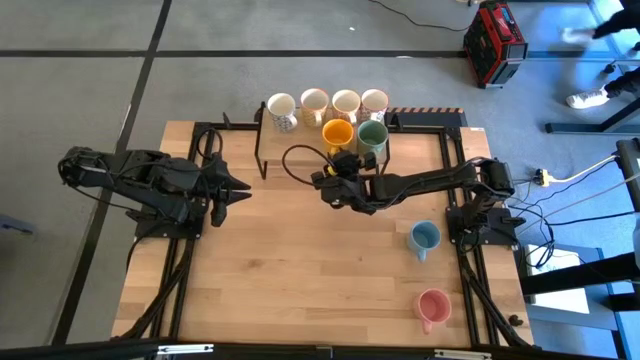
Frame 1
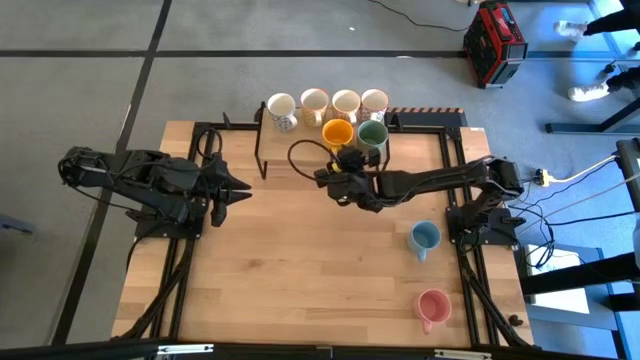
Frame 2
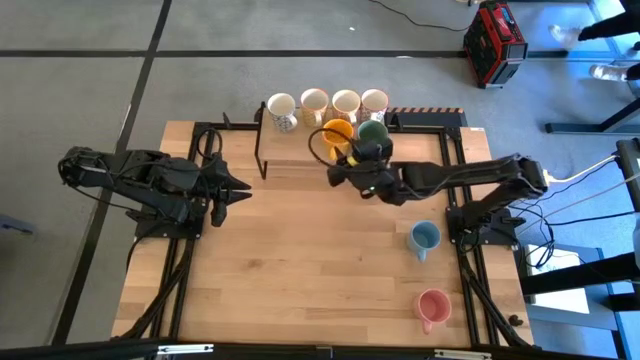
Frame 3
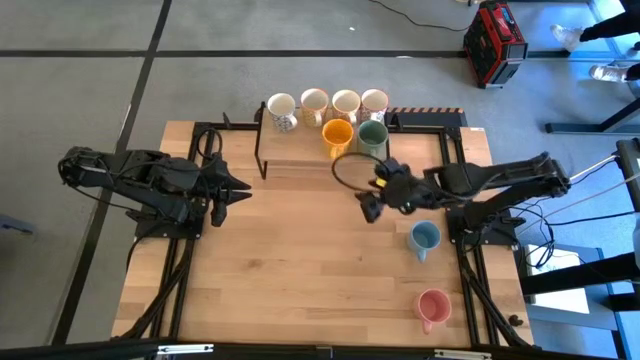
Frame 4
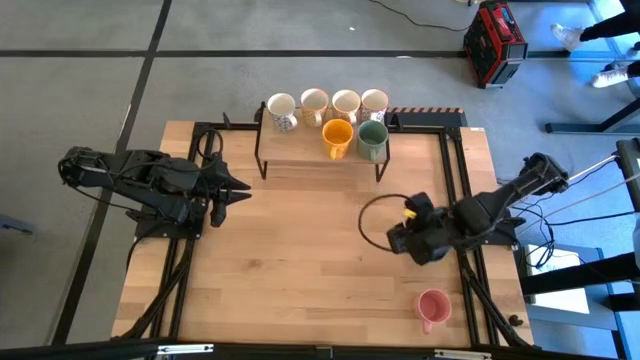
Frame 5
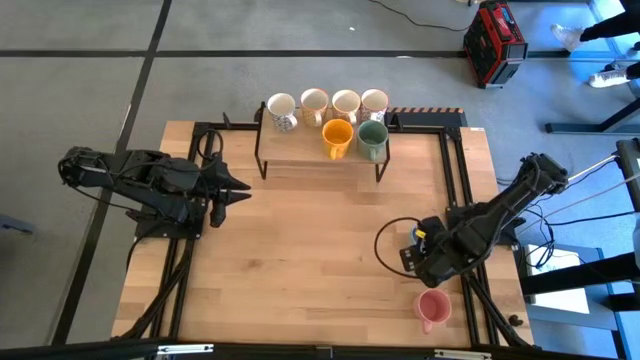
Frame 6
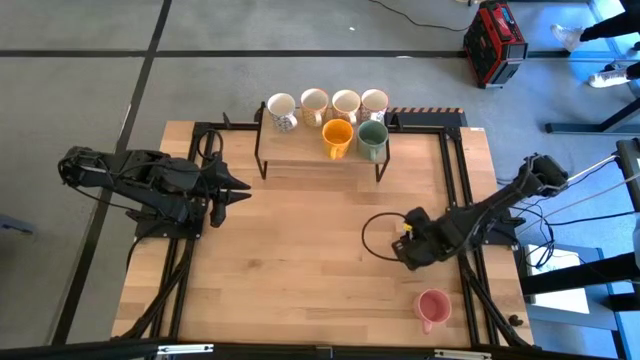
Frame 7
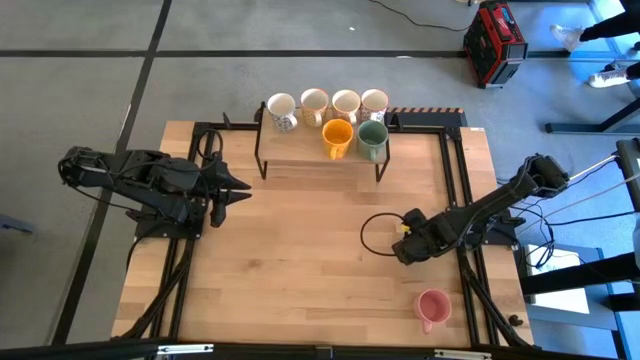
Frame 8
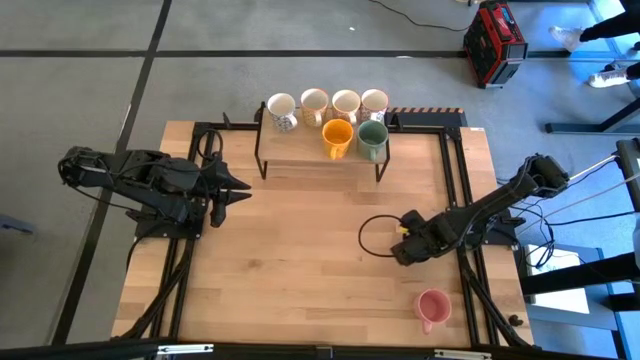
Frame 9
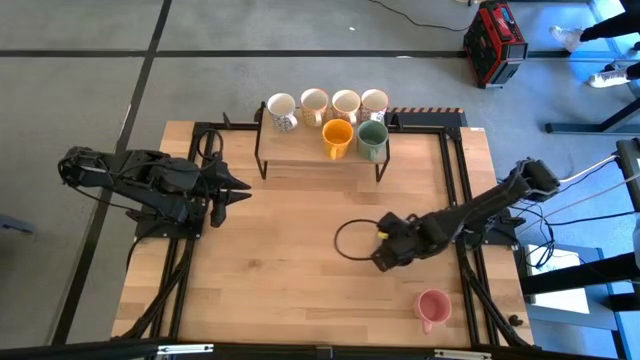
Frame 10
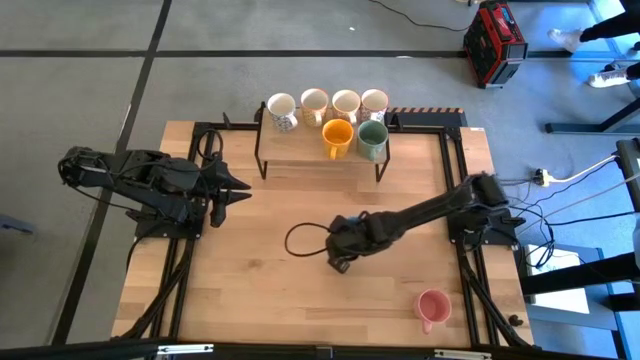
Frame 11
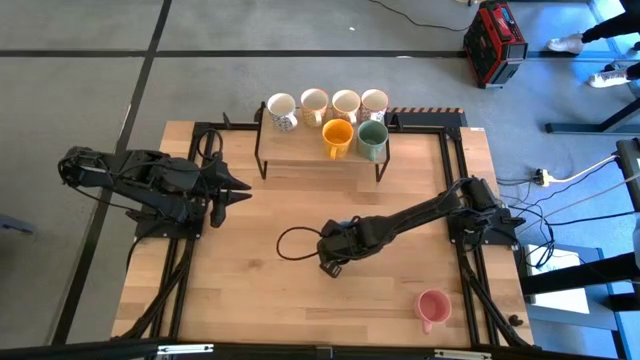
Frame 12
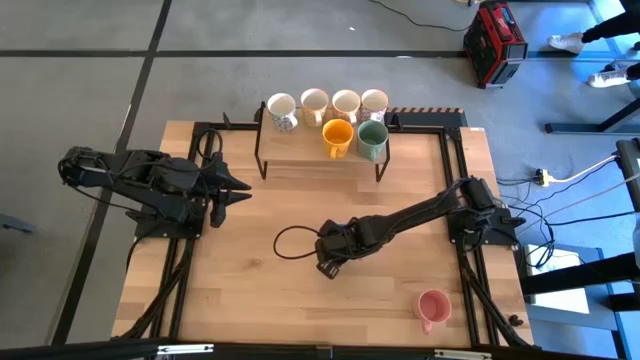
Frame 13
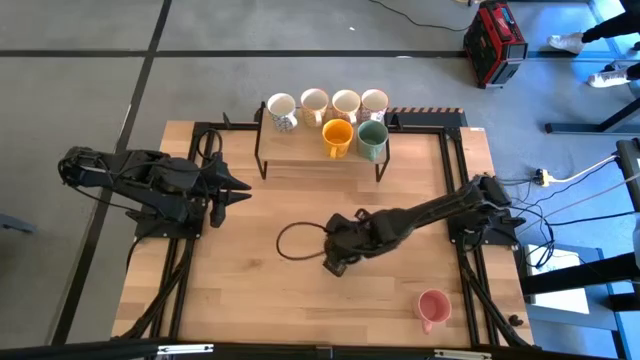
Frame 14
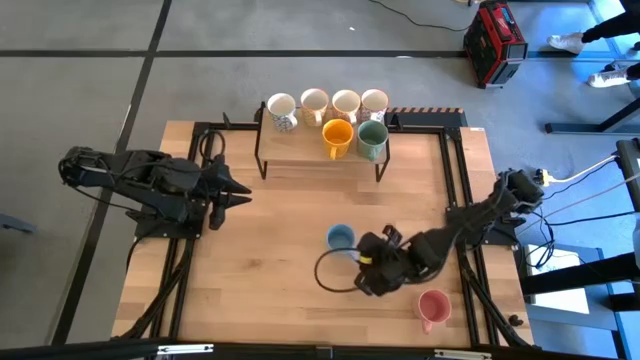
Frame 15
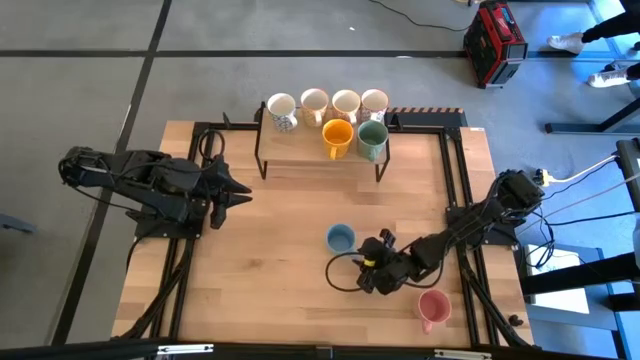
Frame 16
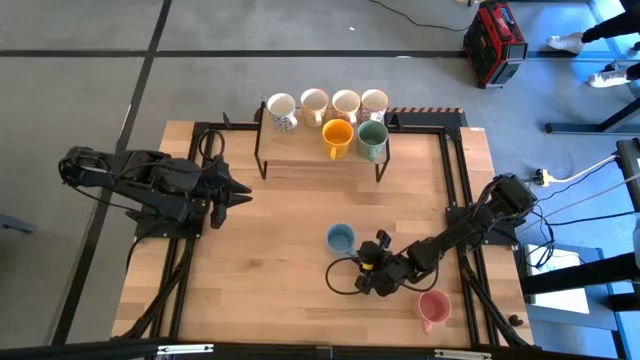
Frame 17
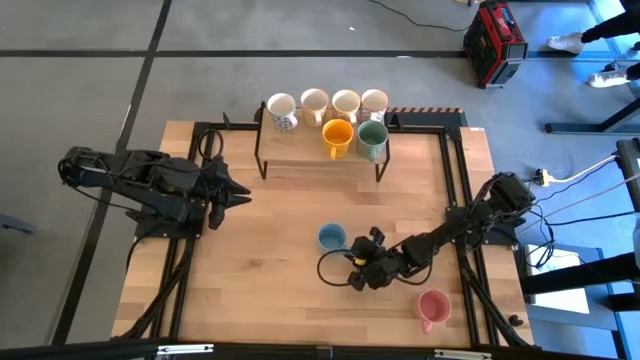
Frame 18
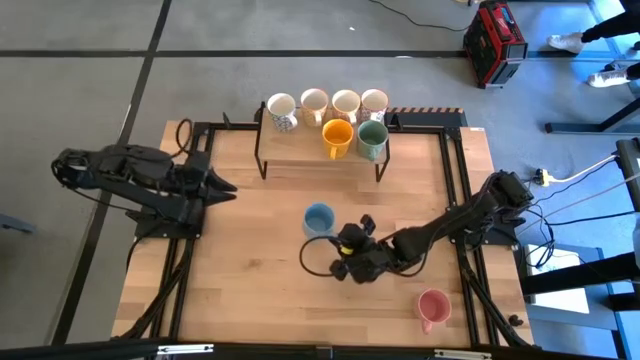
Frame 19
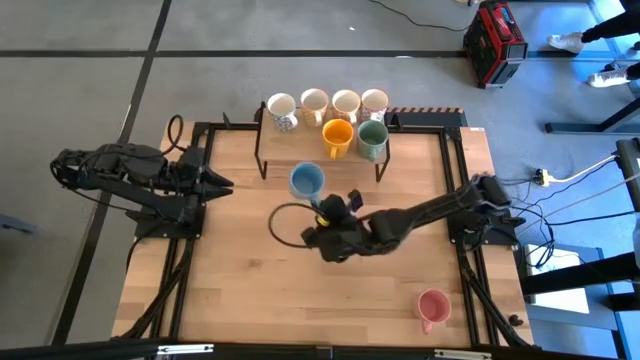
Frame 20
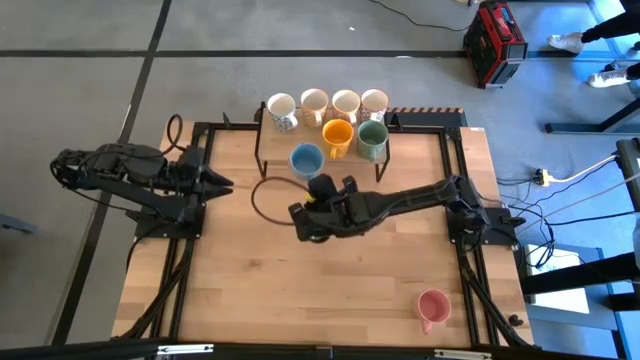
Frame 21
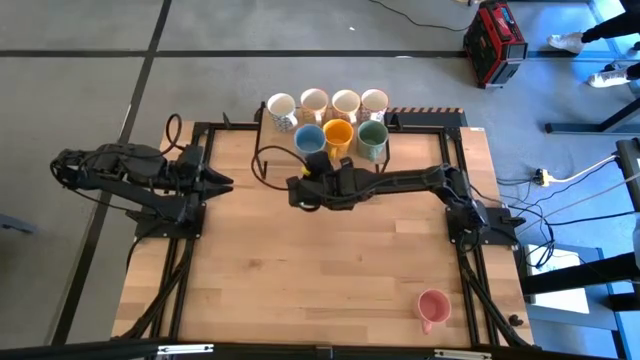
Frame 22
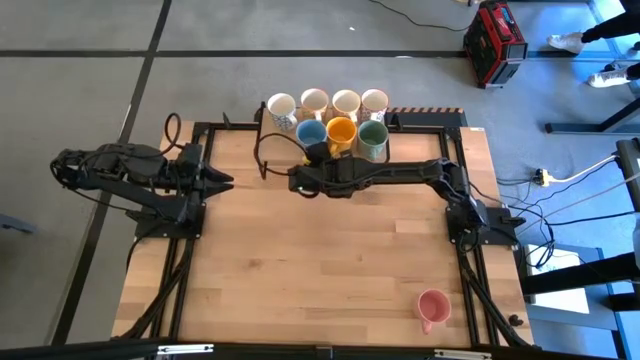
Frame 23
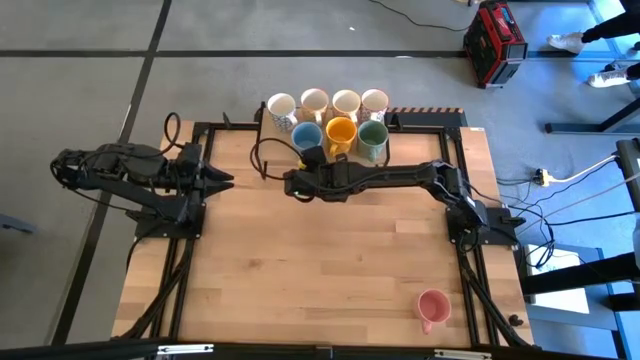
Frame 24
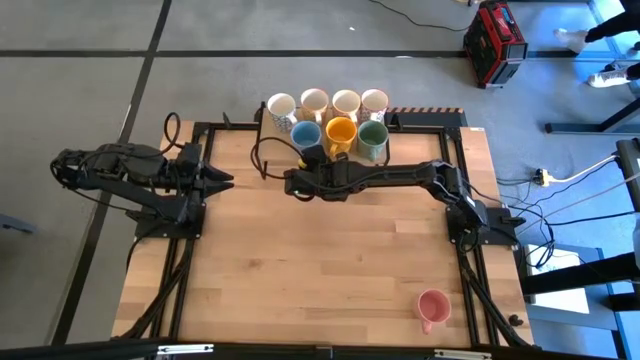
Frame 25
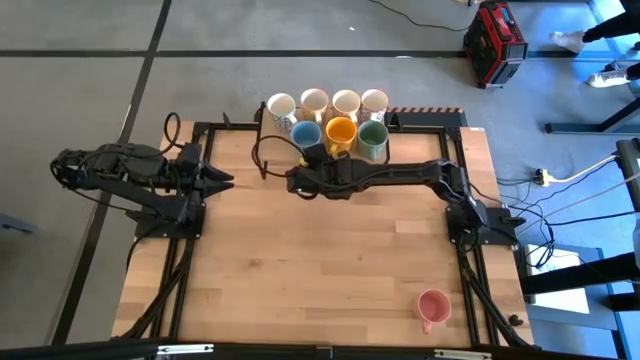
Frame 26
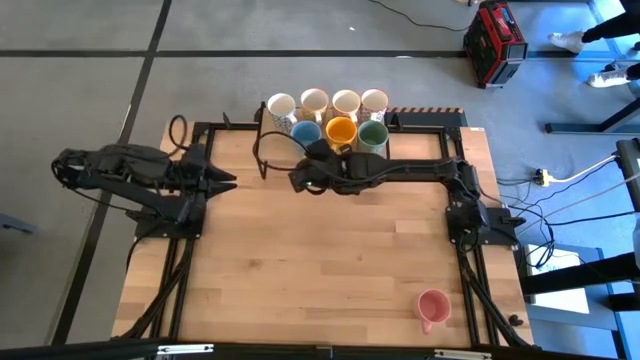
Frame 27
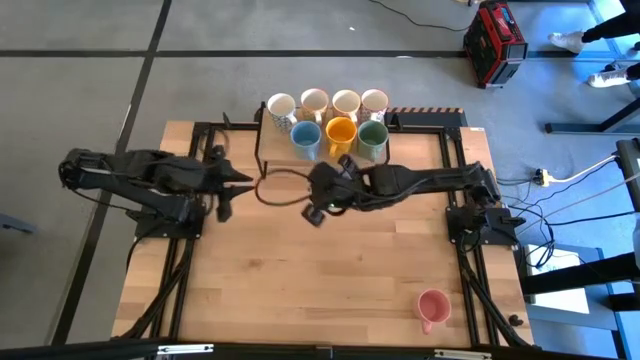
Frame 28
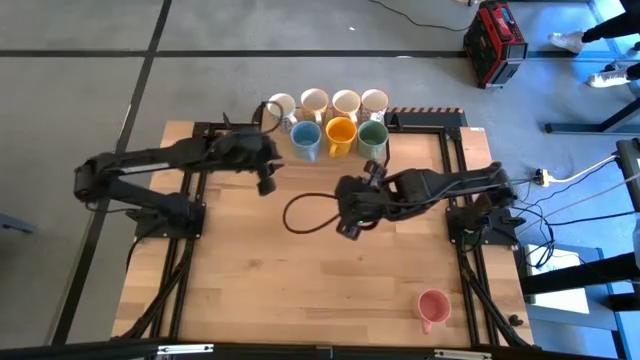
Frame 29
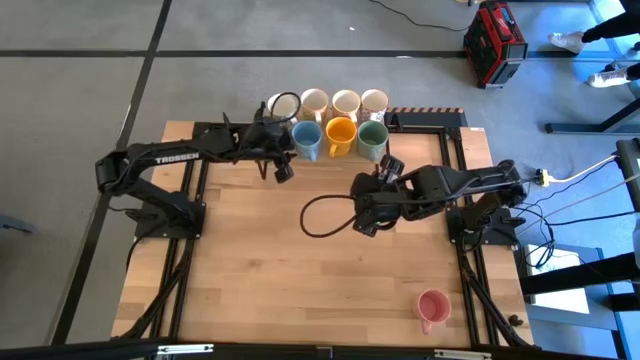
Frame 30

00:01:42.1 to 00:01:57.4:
Task: Place coffee mugs
Put the blue mug on the shelf

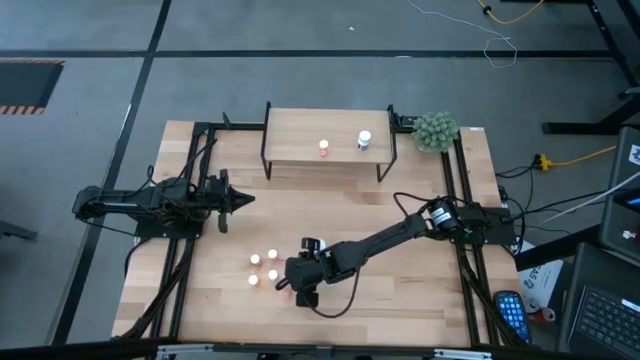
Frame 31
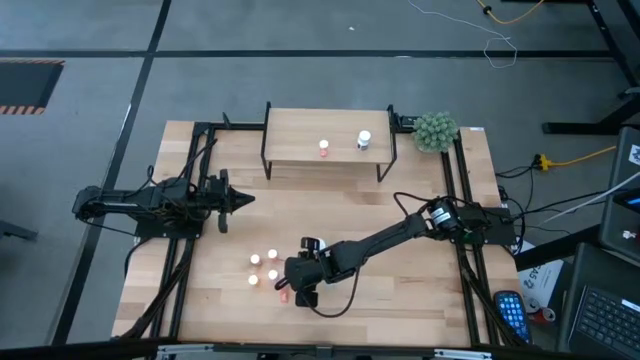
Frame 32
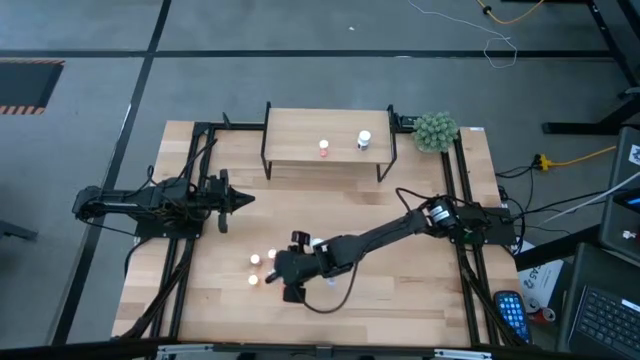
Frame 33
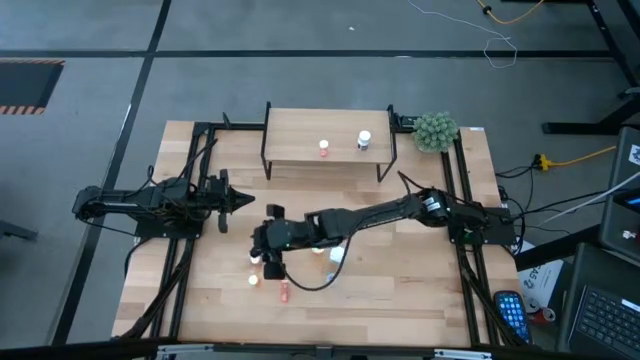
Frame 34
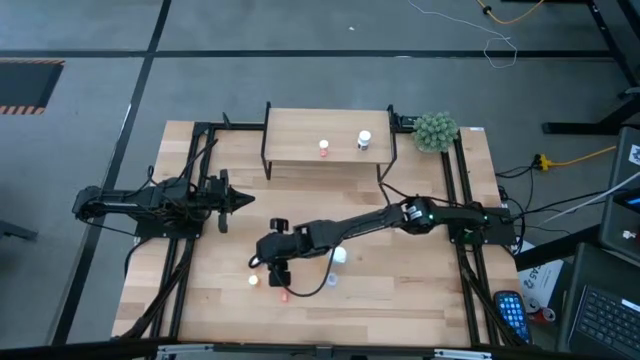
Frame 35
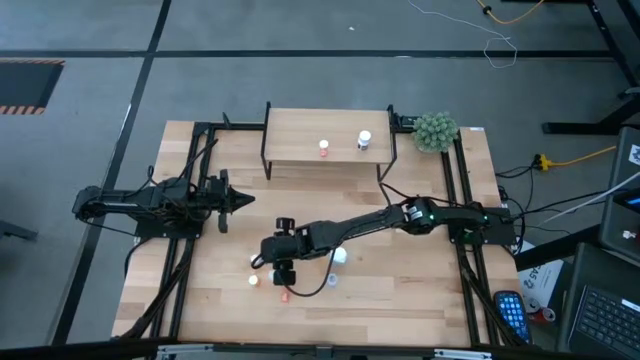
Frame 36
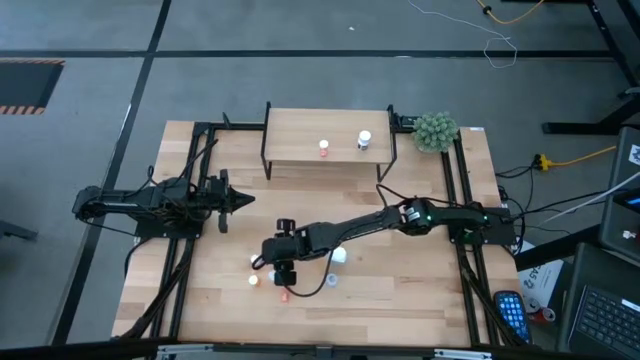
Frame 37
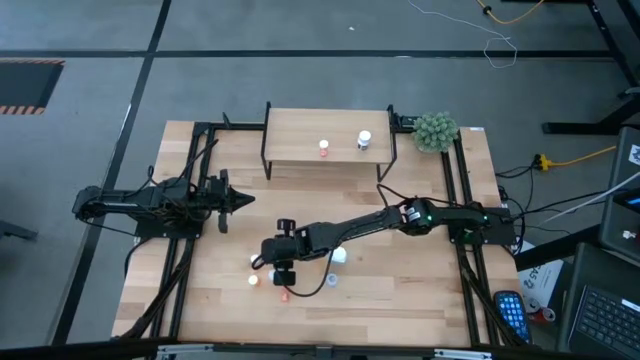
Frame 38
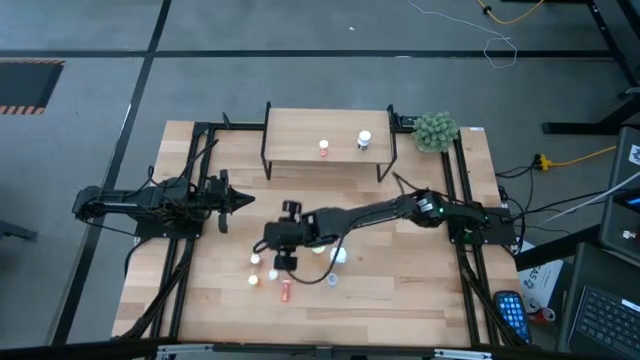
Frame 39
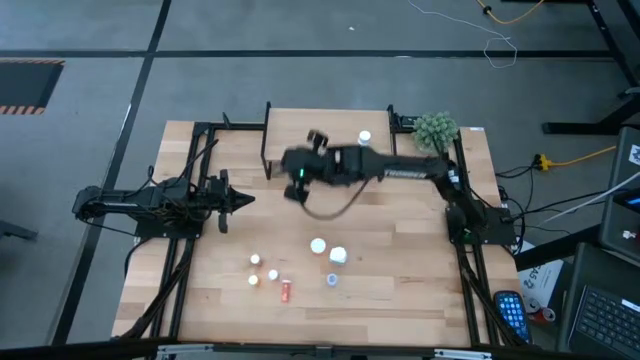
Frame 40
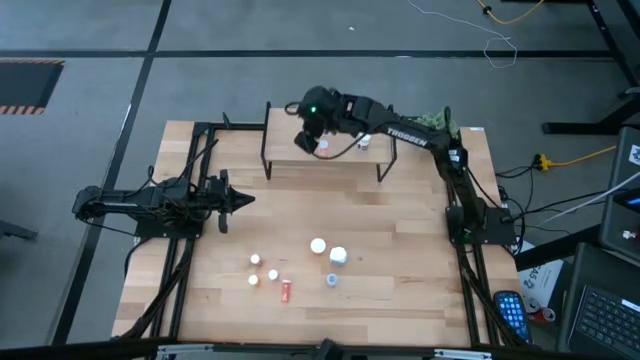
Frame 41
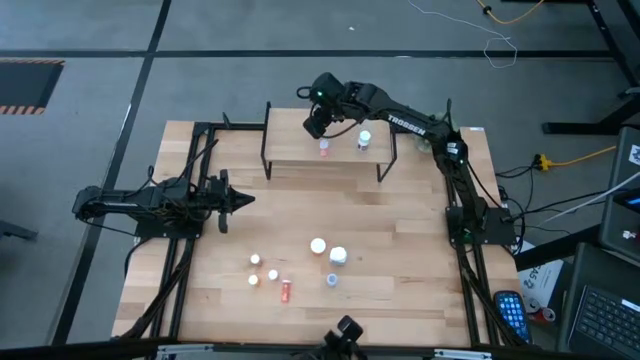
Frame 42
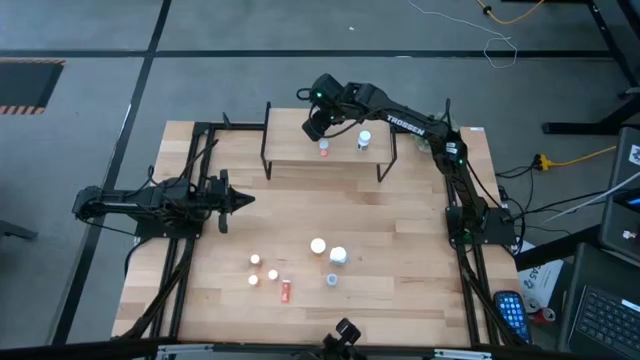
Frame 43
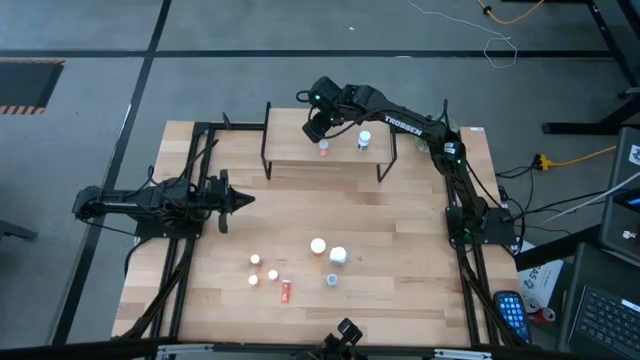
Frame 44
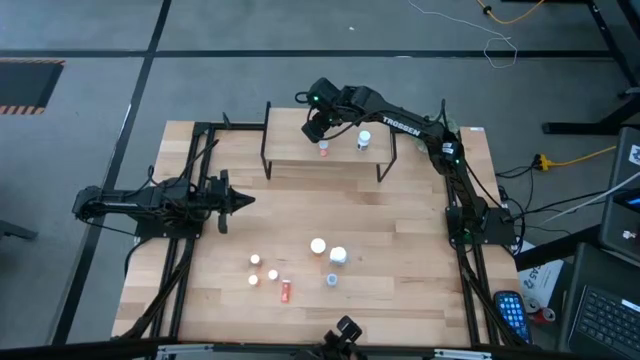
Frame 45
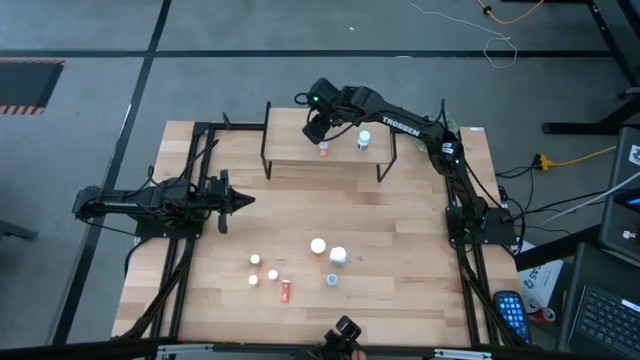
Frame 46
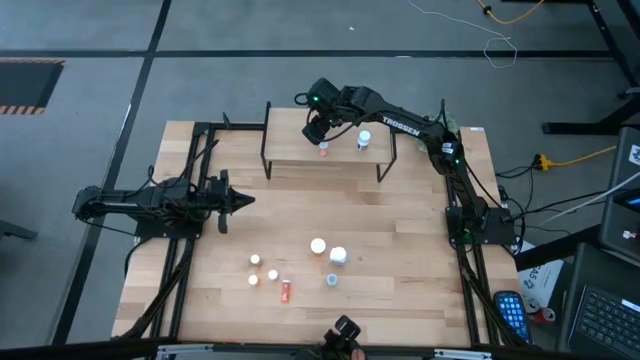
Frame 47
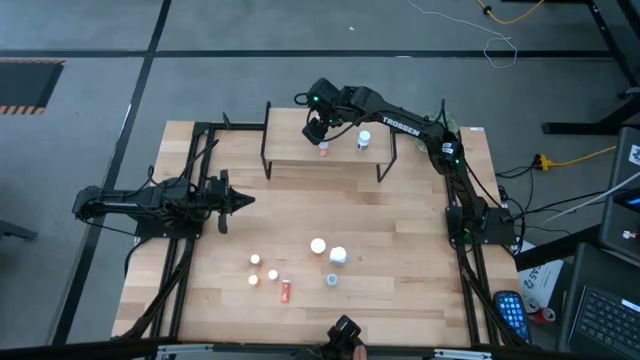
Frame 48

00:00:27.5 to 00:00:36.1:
Task: Pick and place medicine bottles onto shelf by color
Put the light orange pill bottle on the shelf
